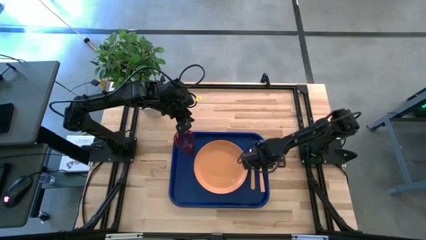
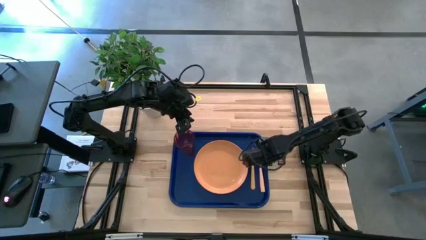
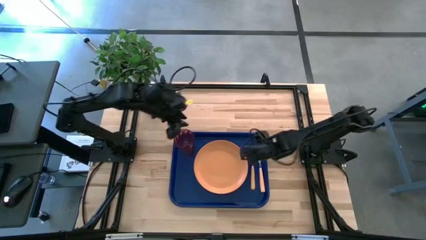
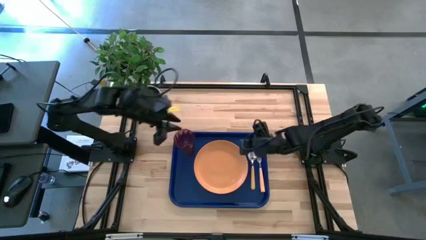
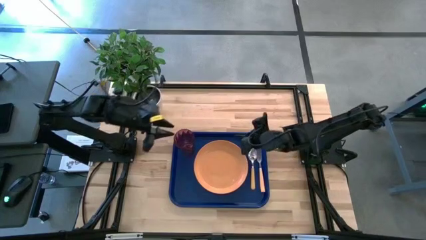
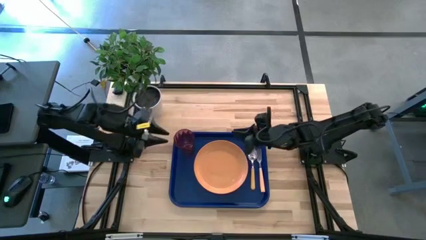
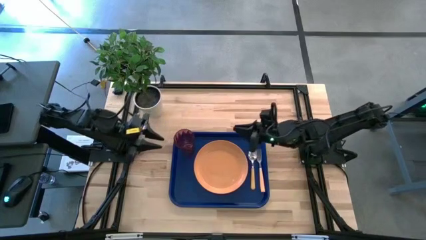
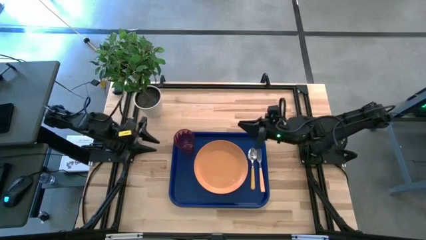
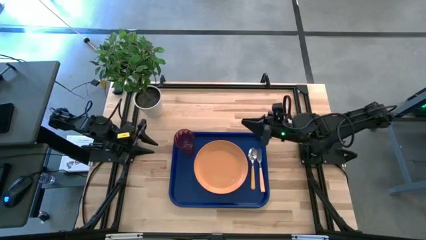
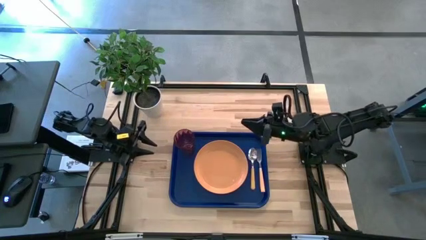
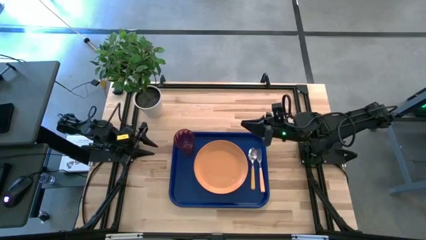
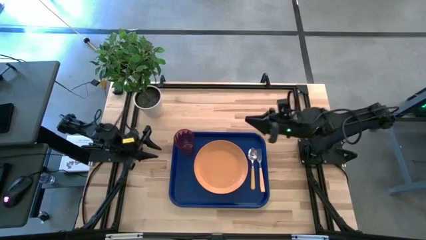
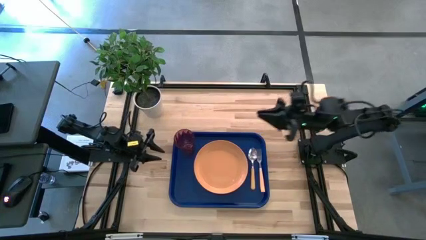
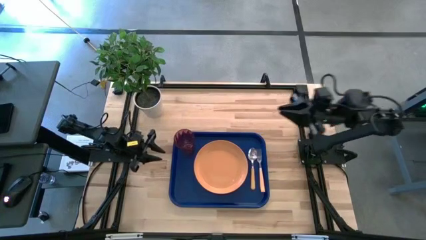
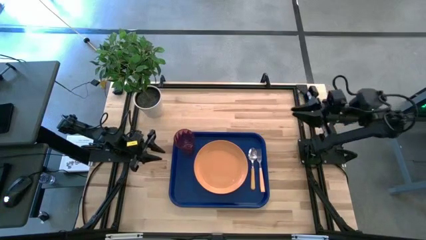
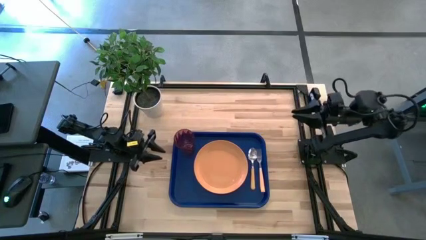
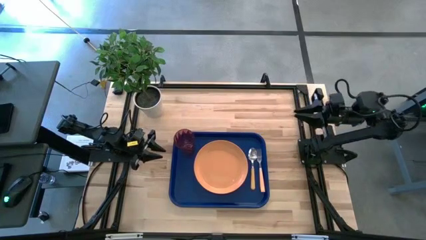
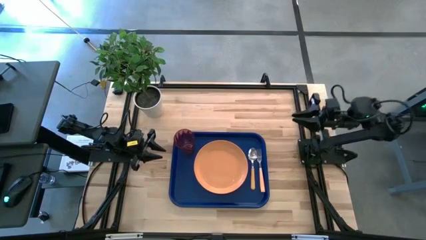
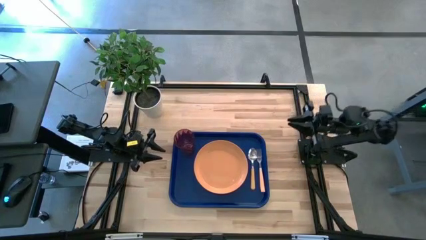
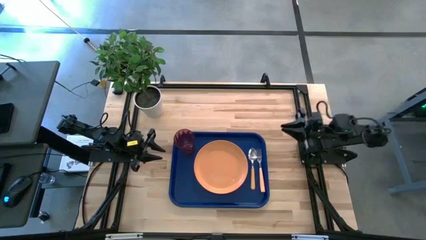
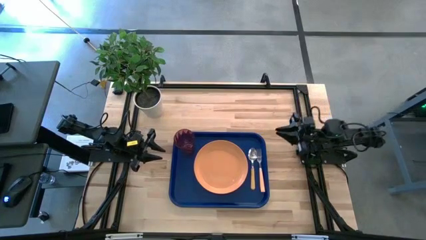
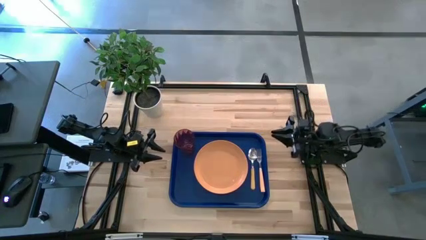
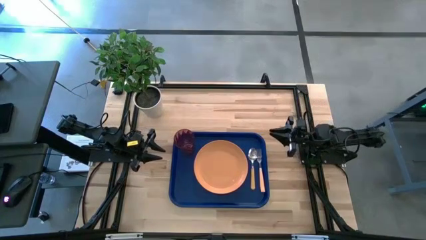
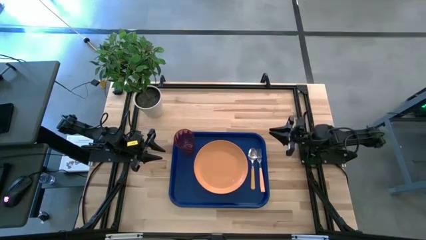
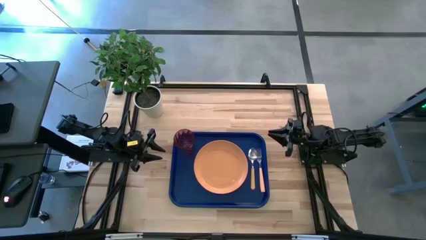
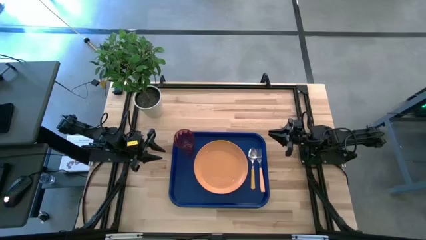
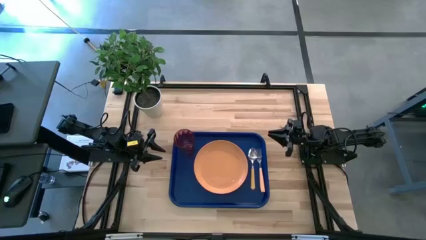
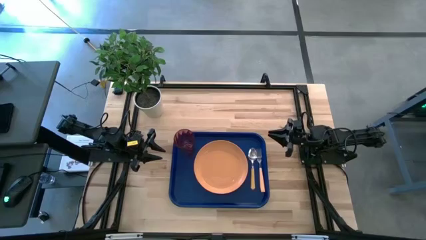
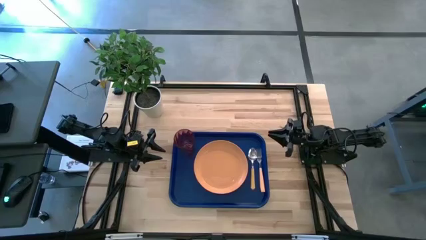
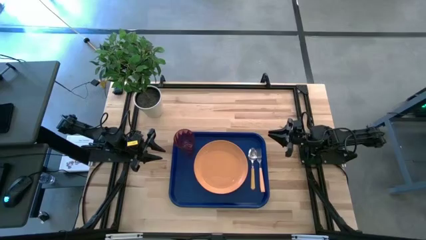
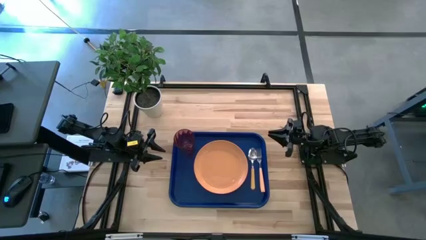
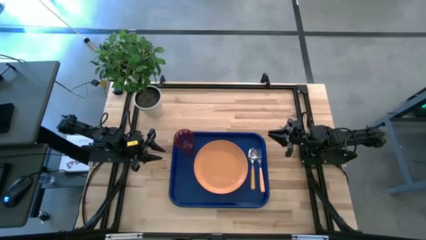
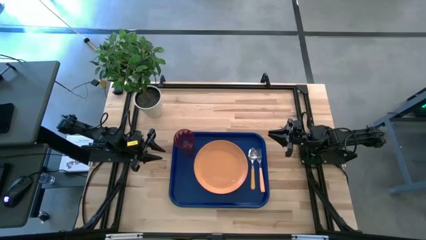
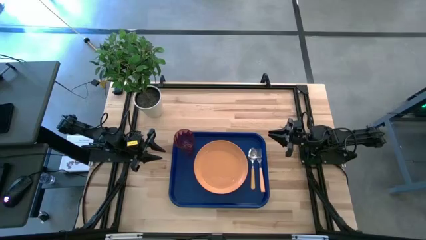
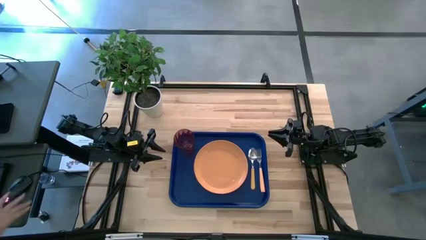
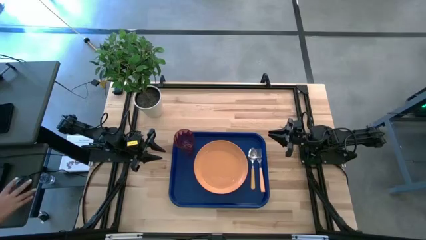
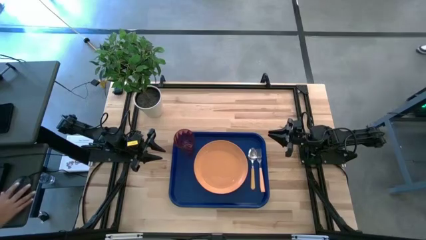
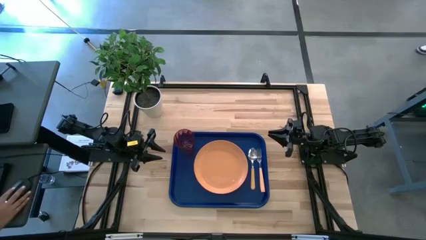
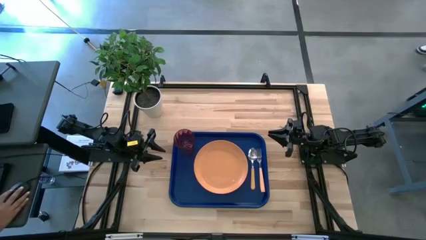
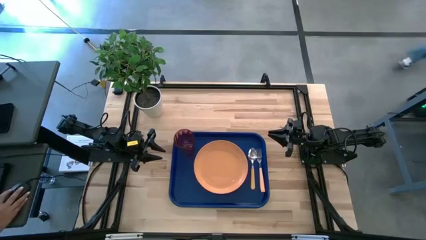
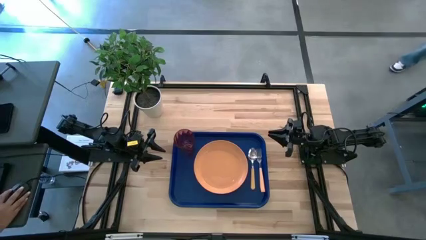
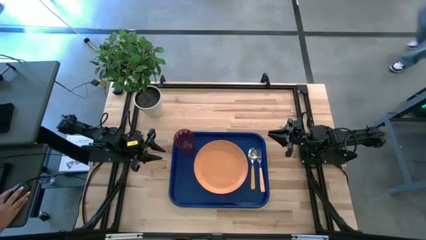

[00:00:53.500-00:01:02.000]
Task: Pick and place plate/cup/fork/spoon on tray
Return to Home Position

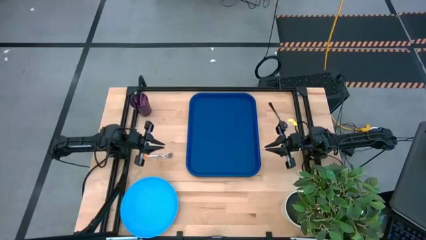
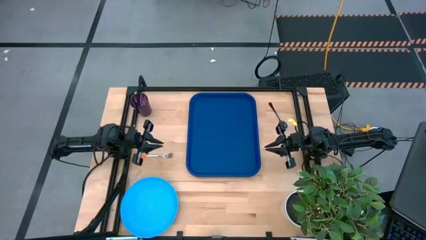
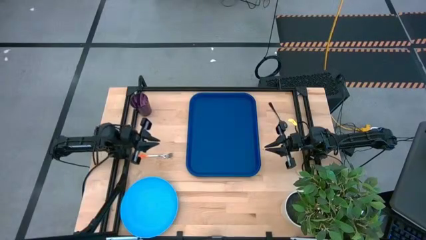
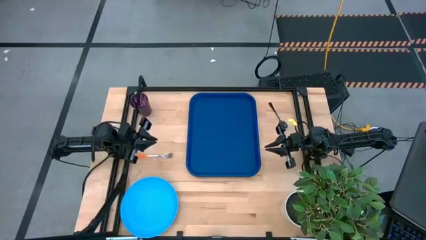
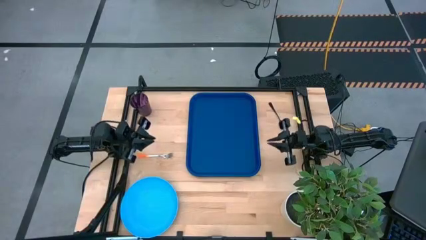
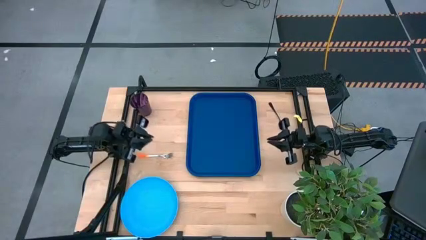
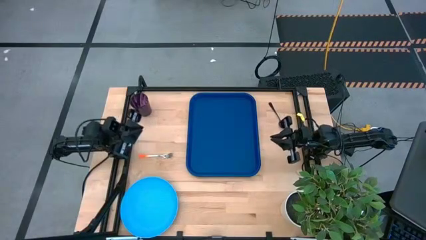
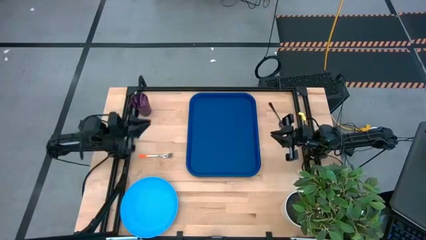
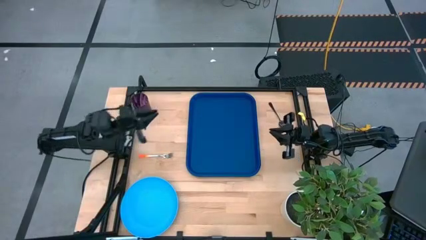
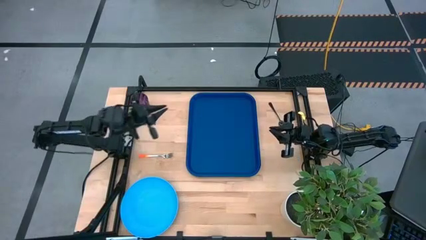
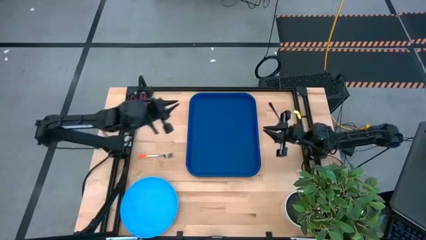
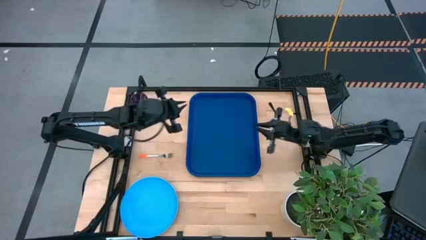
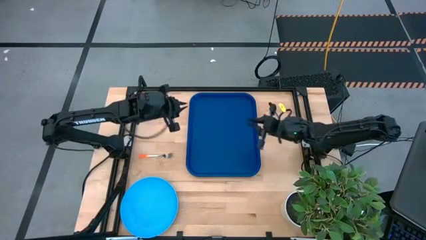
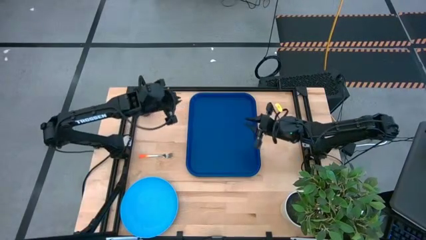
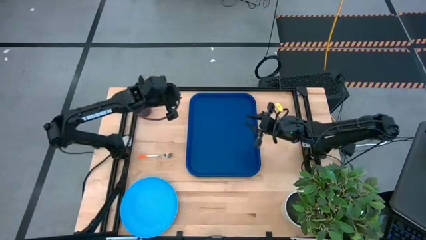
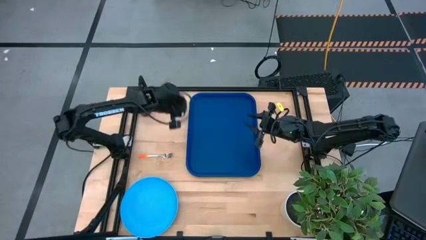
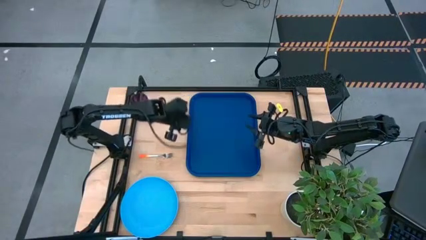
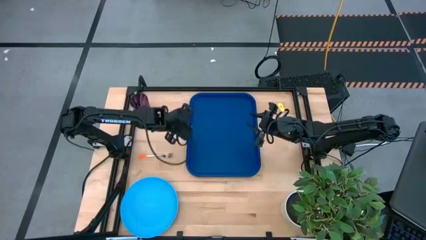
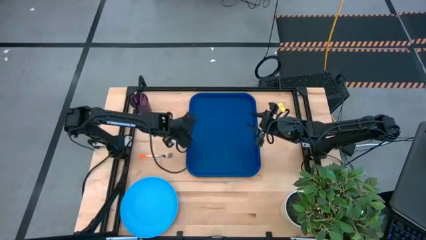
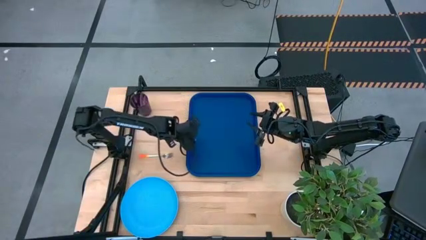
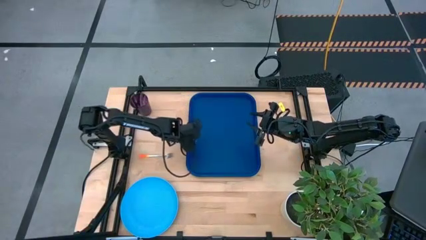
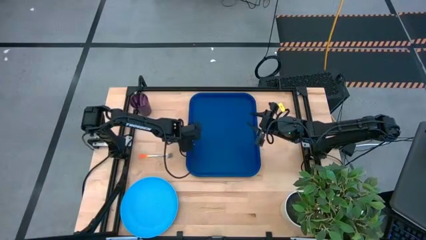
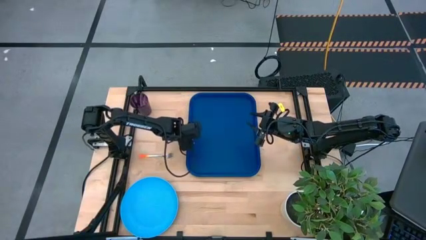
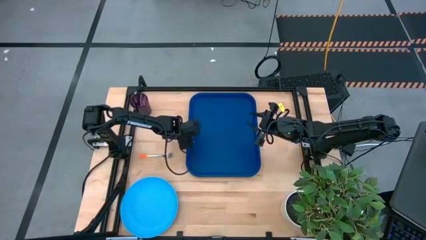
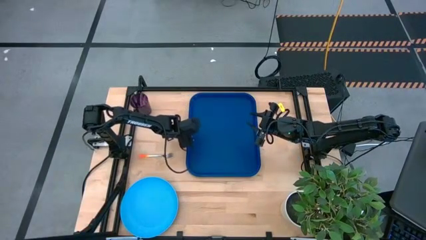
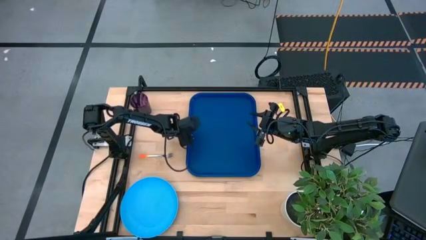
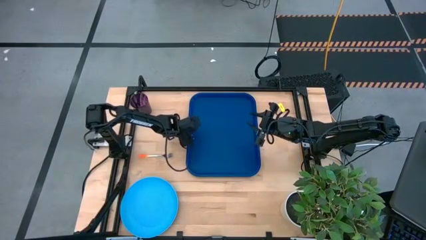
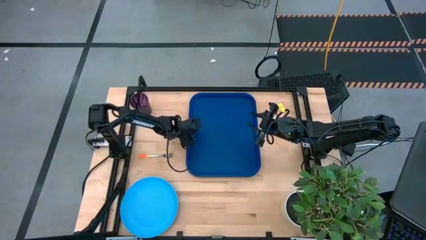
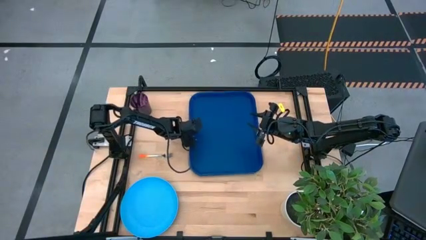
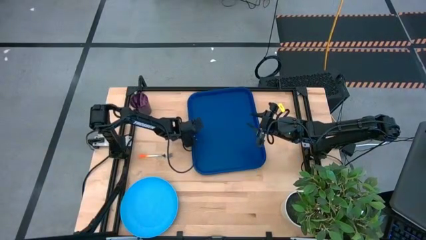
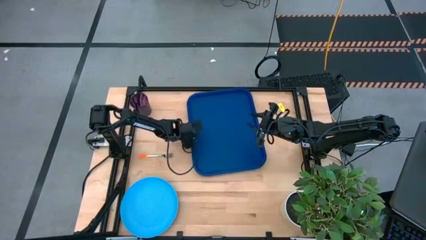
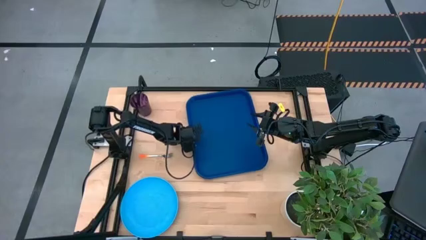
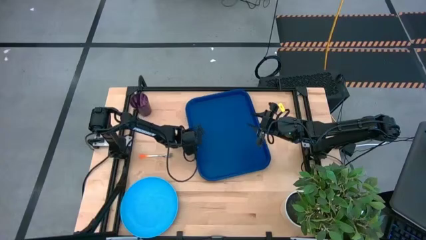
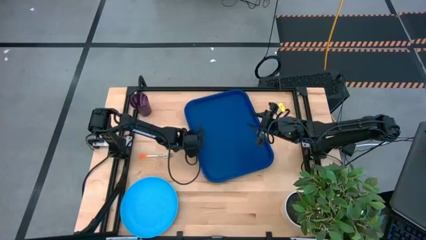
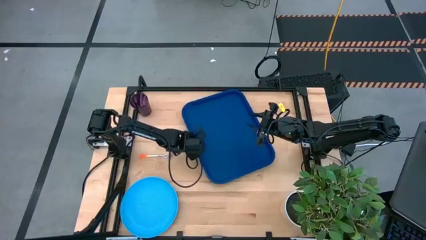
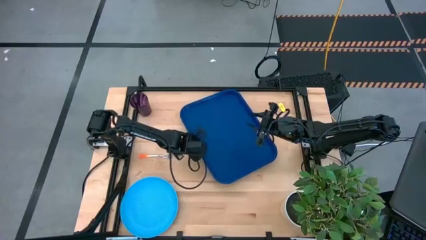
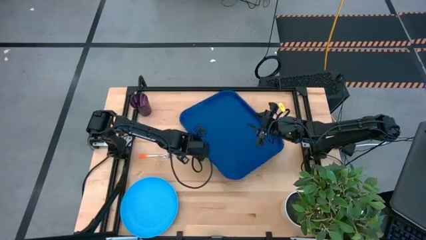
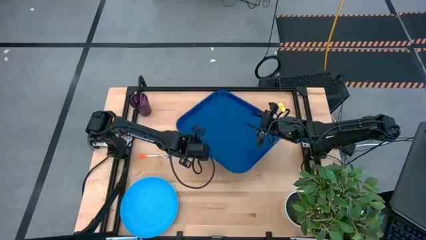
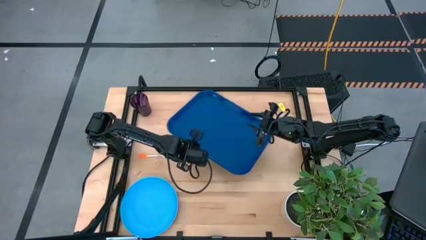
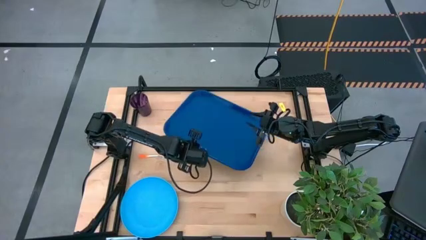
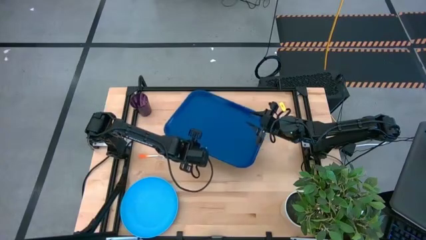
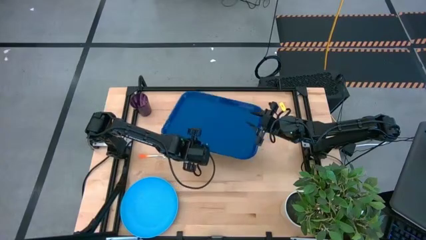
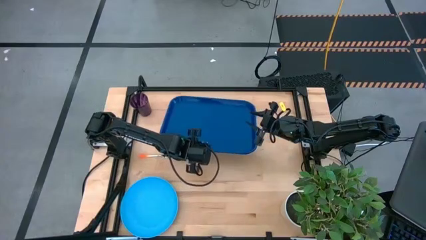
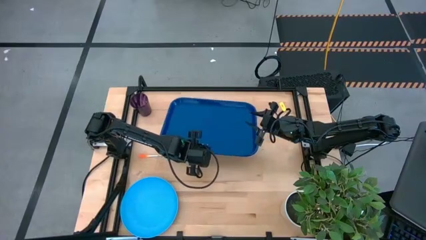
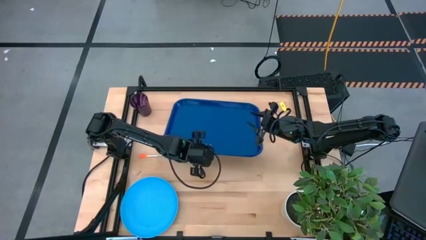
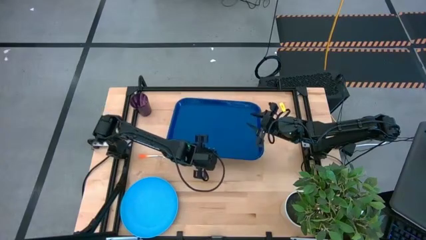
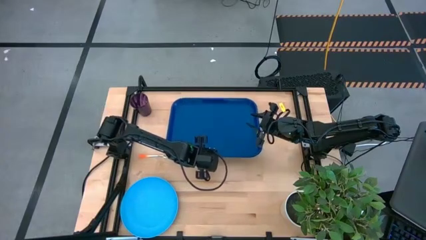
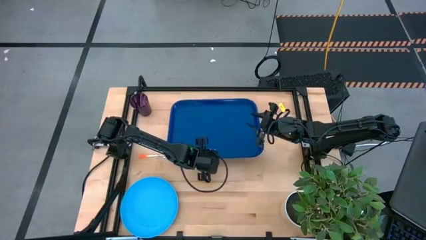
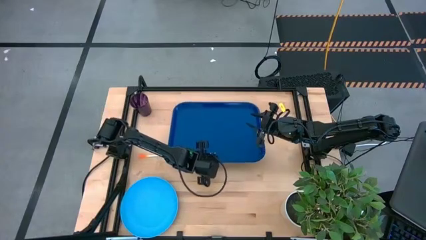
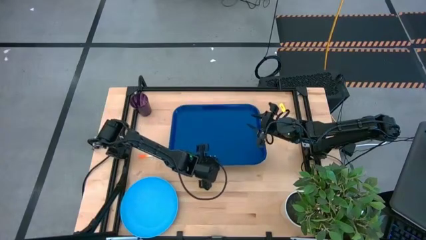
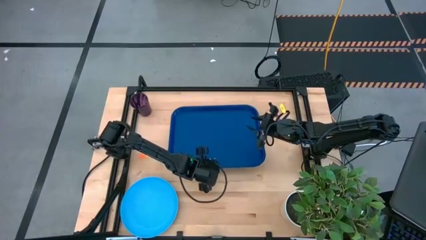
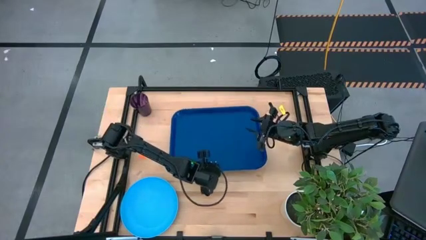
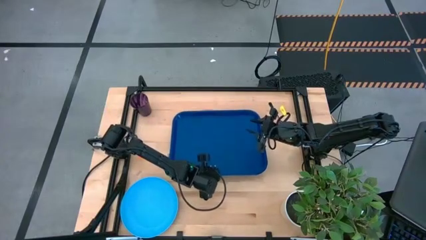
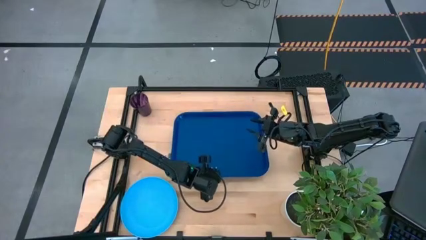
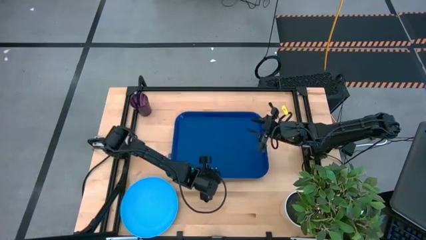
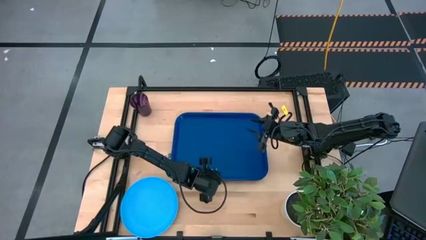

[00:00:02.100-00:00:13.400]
Task: Pick and place plate/cup/fork/spoon on tray
Prepare the blue serving tray to the center of the table
